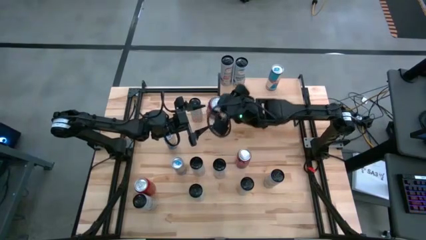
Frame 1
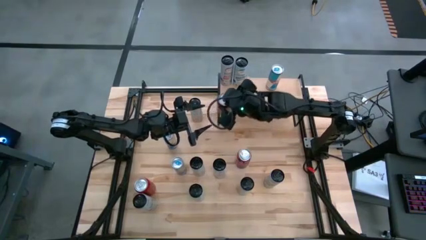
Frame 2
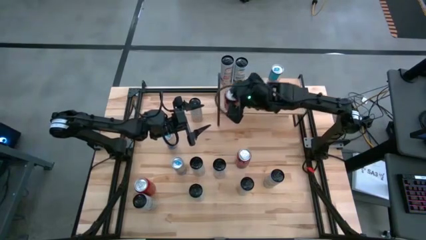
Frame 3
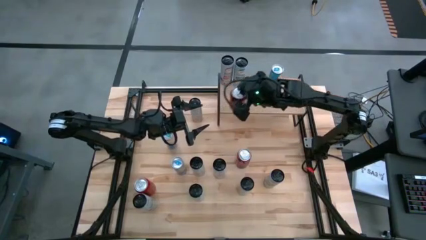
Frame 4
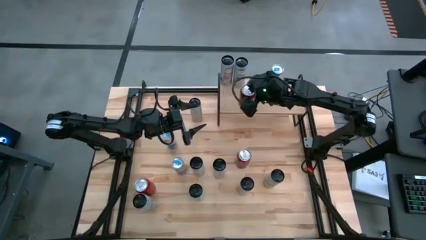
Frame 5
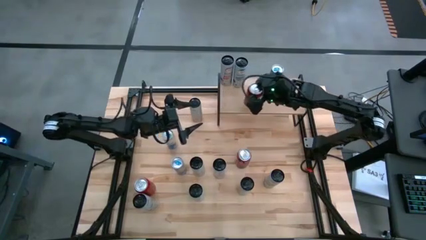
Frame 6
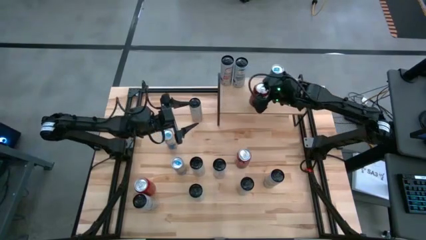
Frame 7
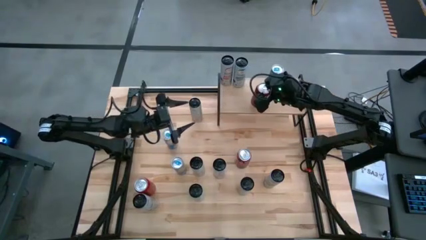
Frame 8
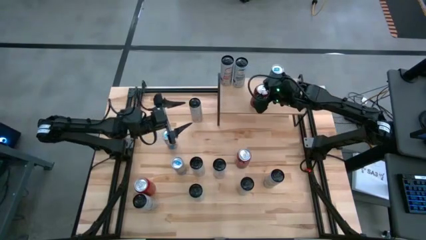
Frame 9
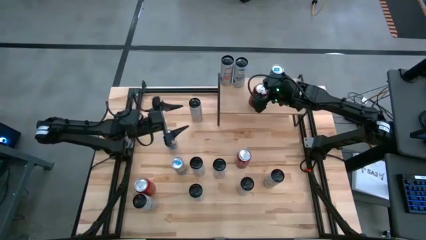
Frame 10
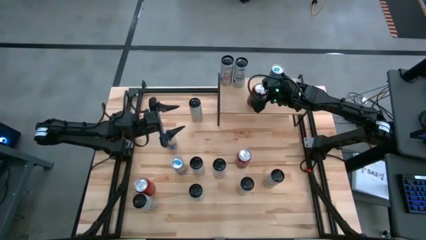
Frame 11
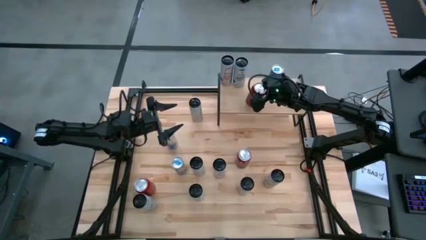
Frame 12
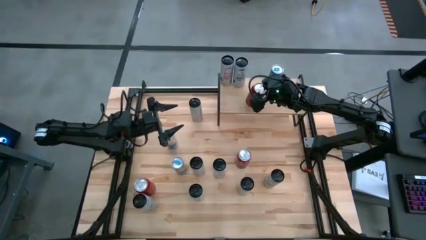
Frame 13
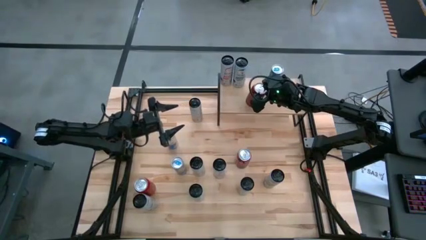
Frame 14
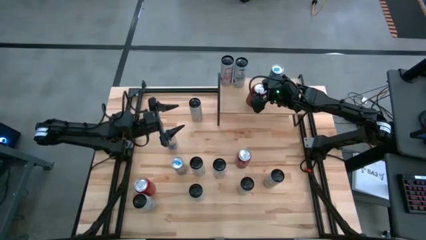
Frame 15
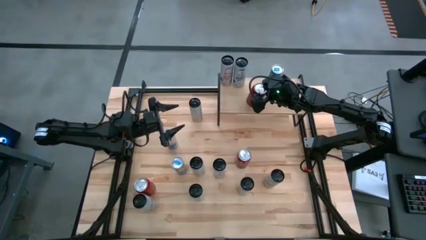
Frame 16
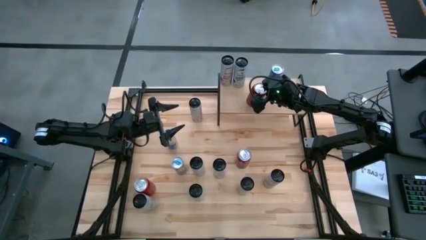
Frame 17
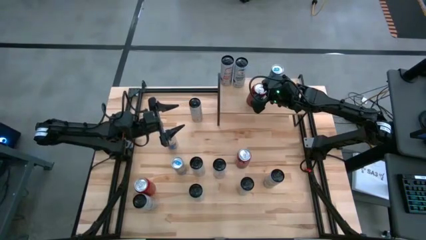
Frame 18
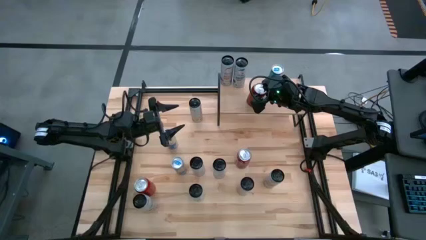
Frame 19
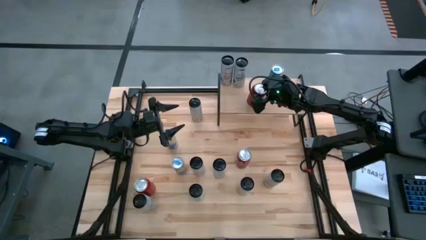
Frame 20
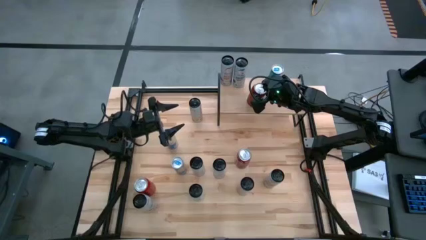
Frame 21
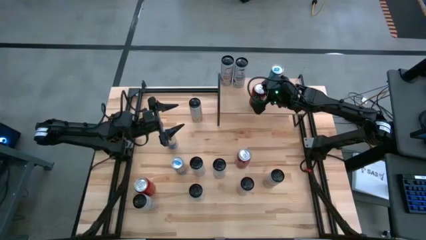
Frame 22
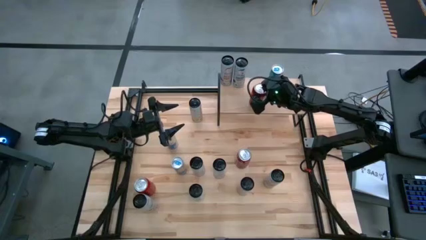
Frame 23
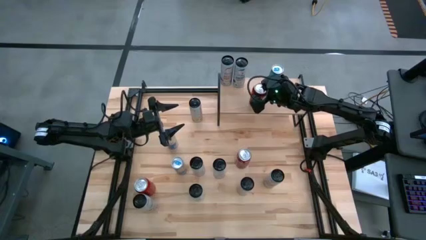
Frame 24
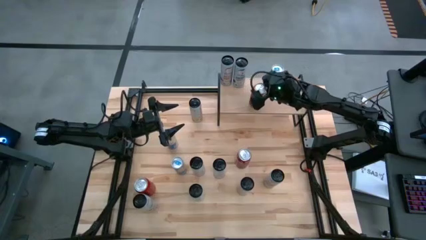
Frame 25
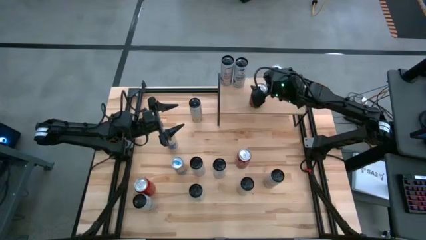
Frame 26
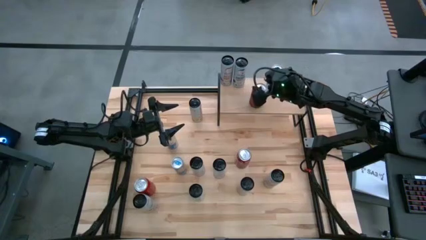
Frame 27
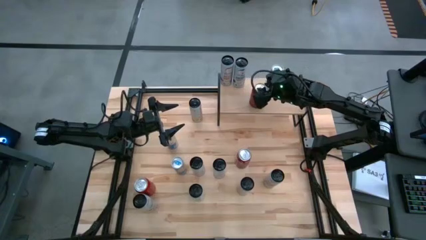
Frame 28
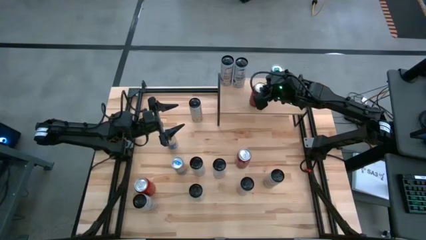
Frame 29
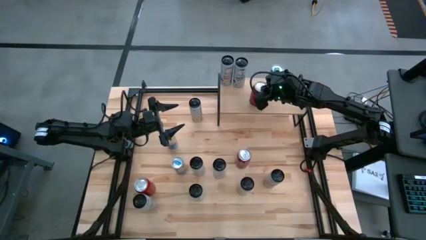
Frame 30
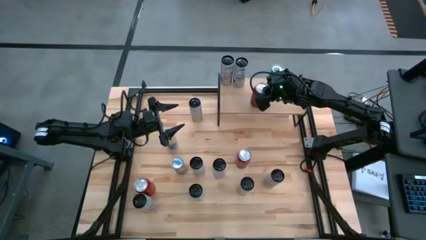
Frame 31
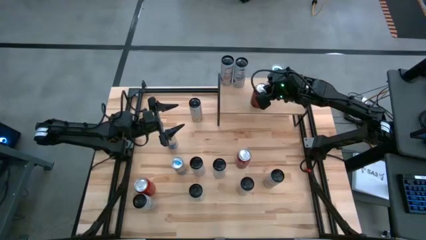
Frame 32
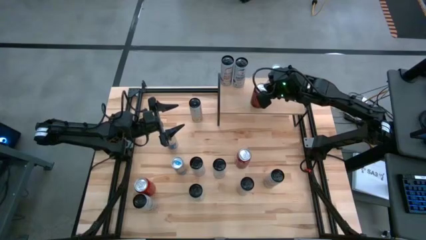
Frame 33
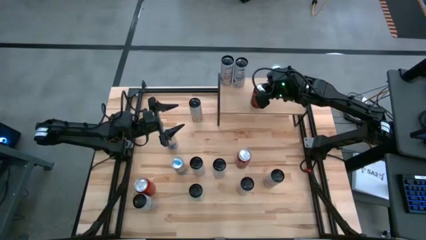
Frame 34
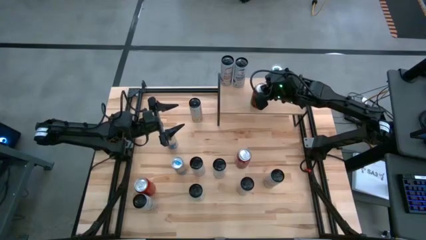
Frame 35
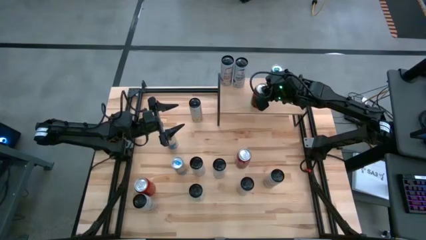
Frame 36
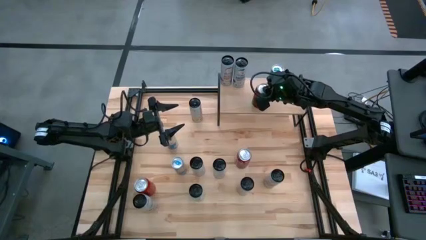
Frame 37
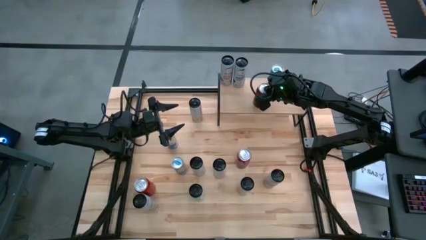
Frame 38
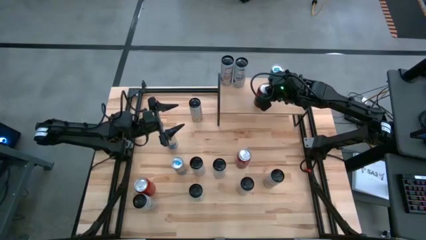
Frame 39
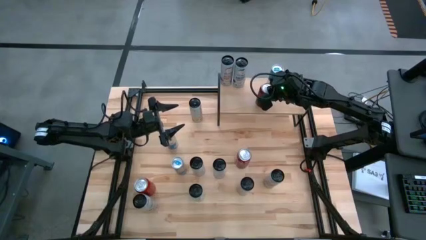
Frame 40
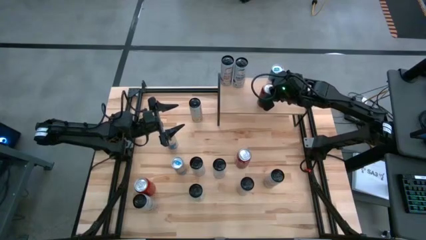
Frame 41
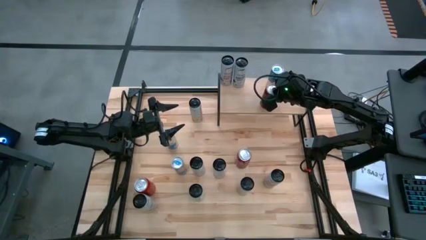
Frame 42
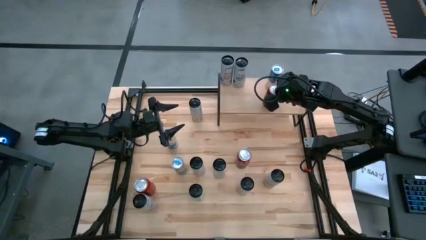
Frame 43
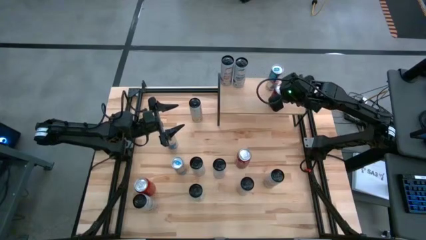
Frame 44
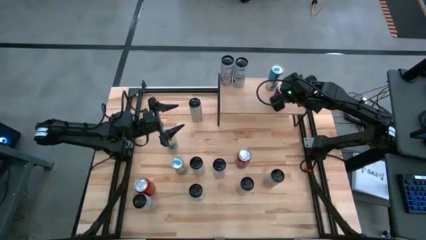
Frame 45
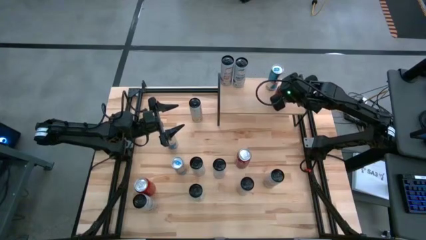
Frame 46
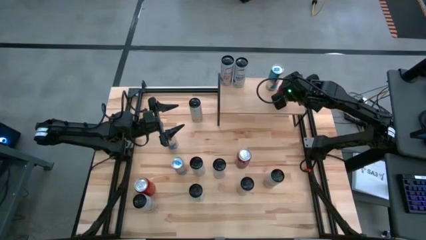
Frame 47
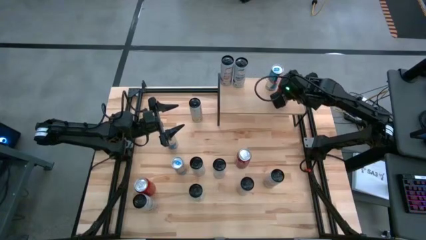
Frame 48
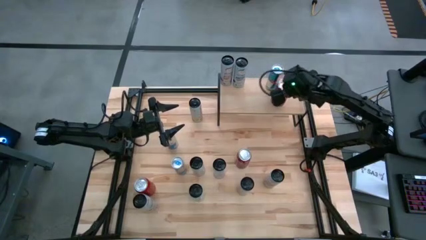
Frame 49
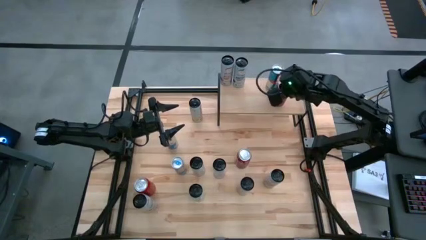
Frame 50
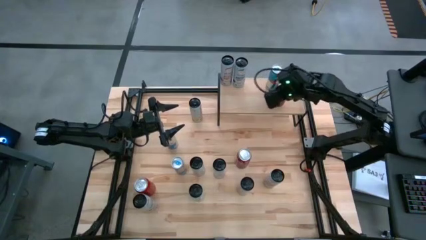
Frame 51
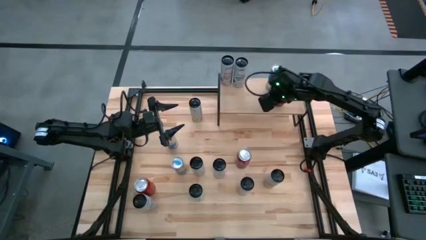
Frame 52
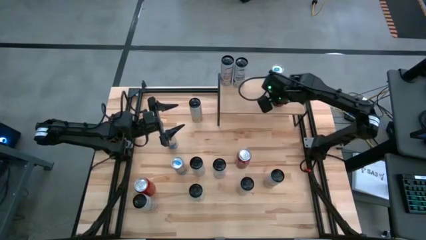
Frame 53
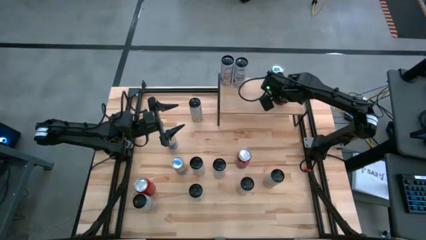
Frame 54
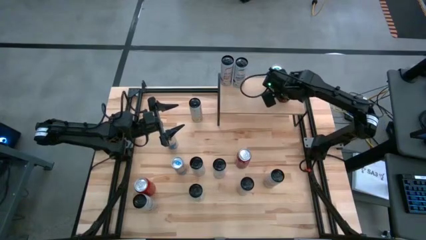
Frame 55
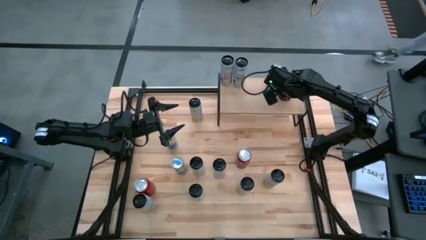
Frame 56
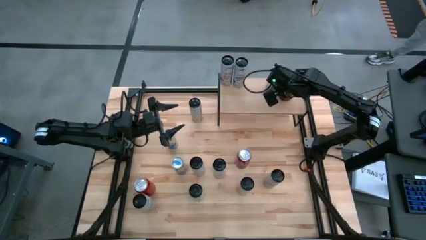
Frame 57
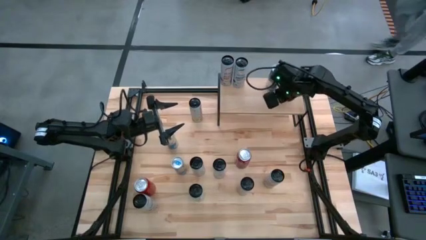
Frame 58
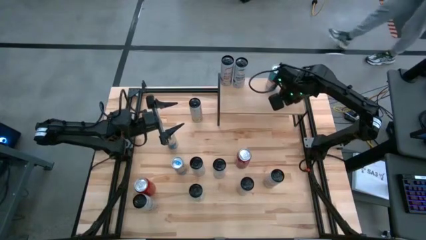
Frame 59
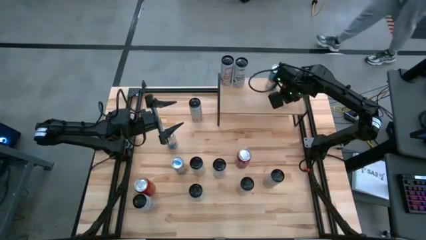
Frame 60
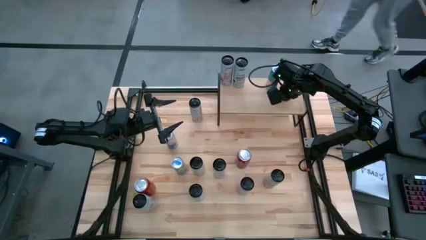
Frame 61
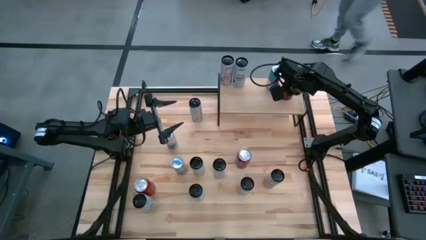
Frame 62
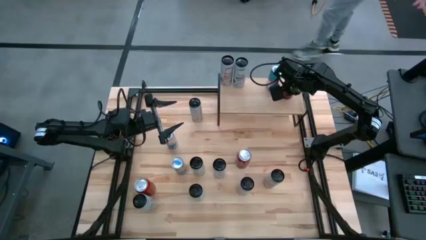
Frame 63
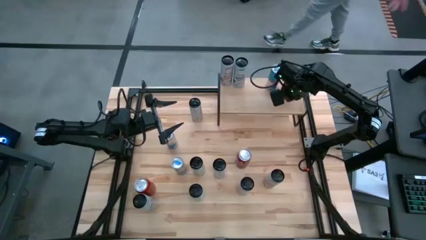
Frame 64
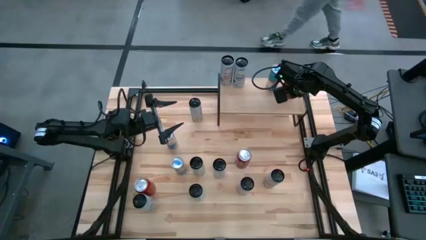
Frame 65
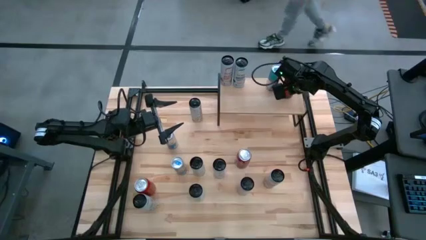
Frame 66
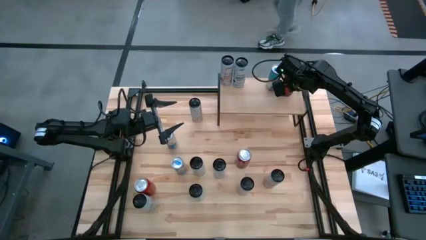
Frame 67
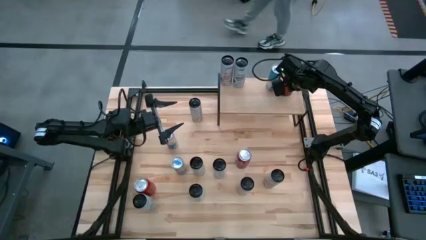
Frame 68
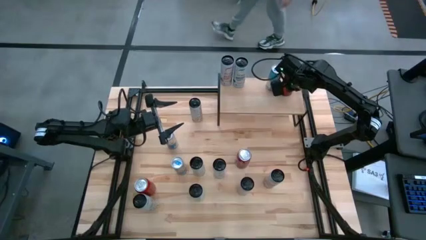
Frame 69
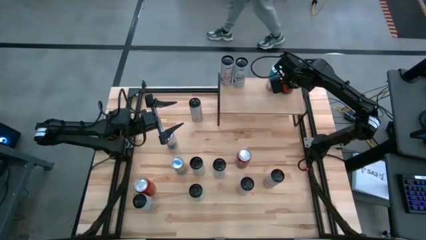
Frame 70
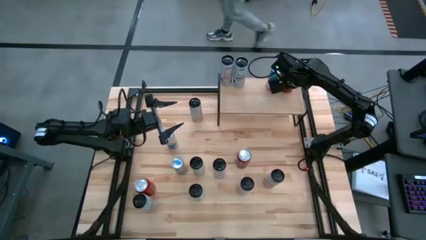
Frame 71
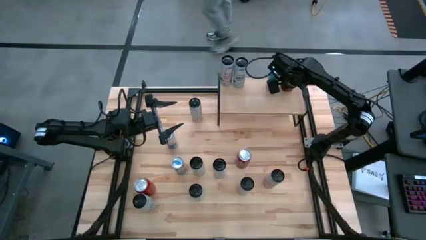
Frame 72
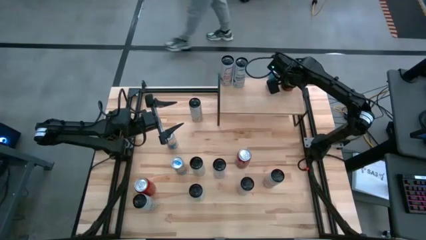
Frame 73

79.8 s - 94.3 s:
Task: Place canned beverage on shelf
Put the top red black soda can on the shelf
